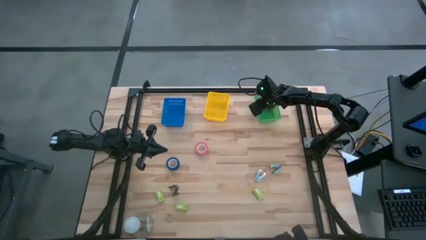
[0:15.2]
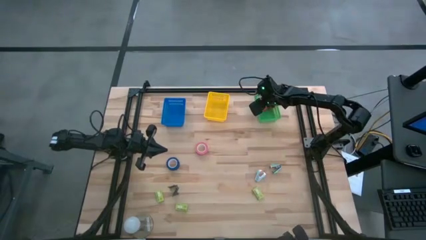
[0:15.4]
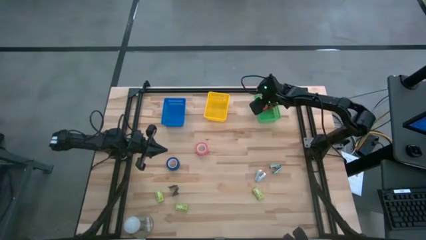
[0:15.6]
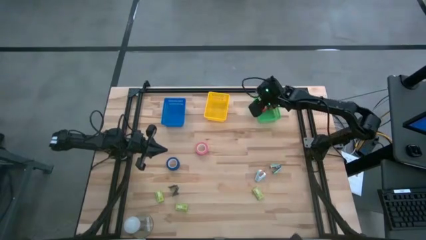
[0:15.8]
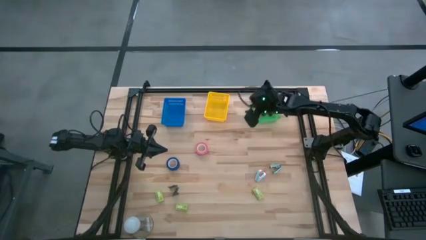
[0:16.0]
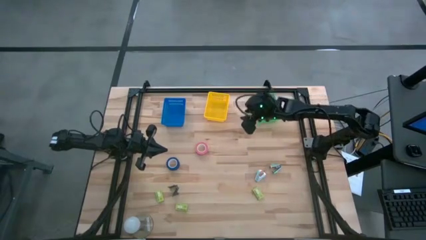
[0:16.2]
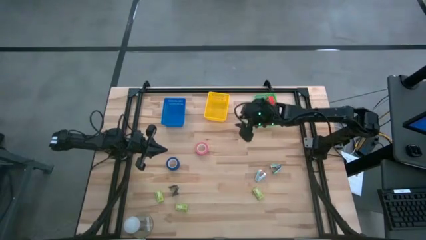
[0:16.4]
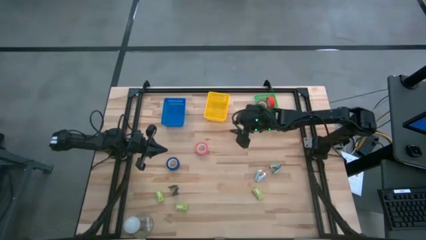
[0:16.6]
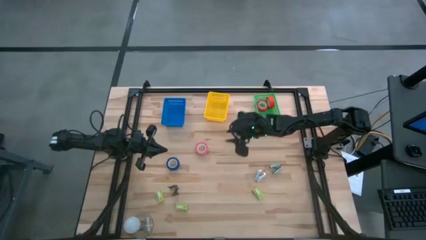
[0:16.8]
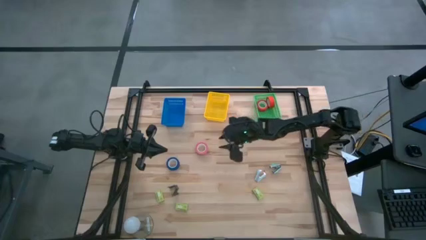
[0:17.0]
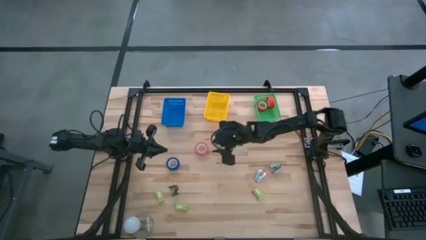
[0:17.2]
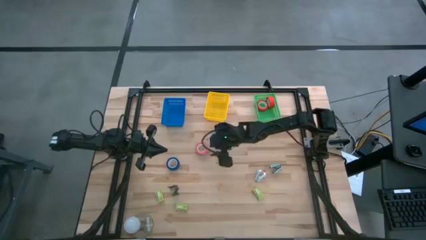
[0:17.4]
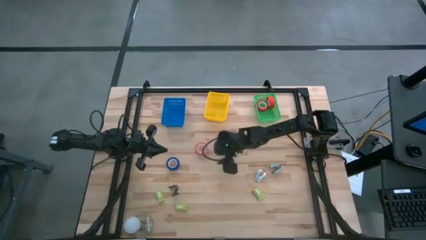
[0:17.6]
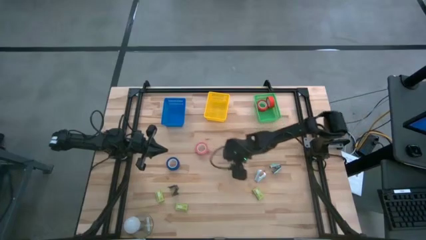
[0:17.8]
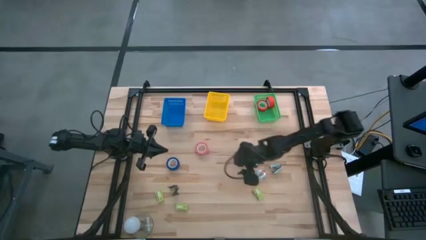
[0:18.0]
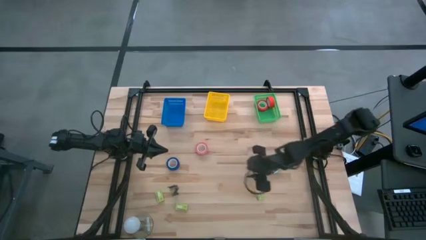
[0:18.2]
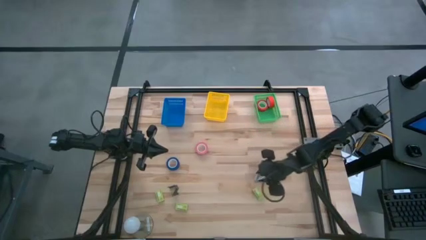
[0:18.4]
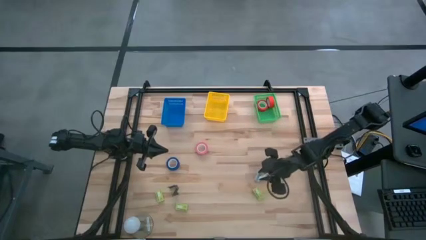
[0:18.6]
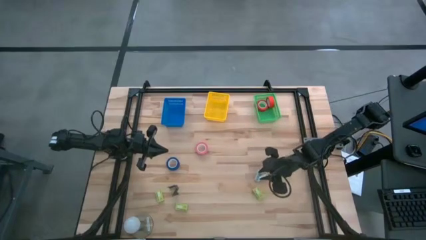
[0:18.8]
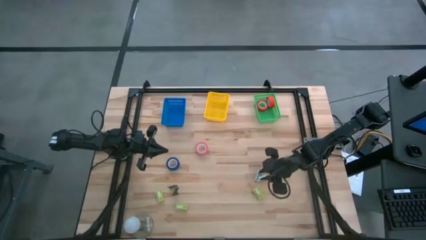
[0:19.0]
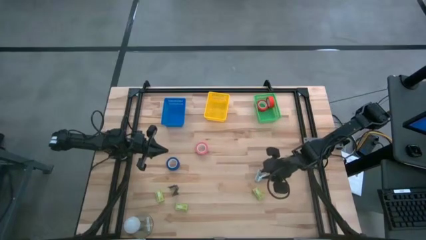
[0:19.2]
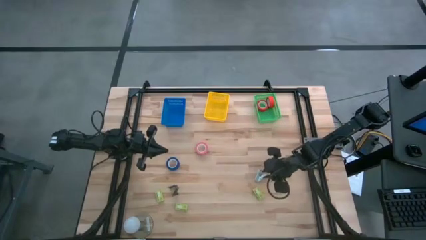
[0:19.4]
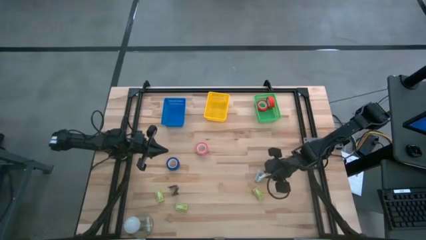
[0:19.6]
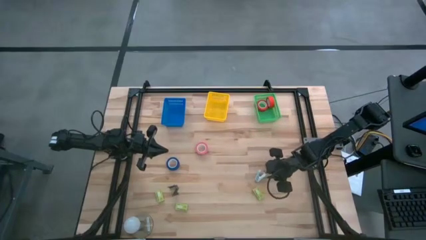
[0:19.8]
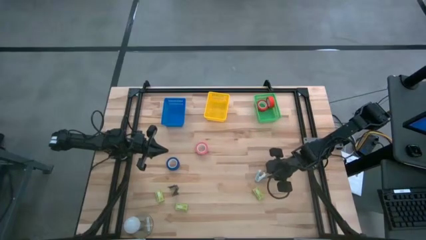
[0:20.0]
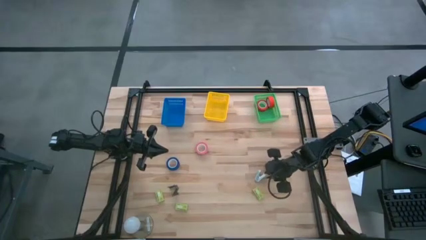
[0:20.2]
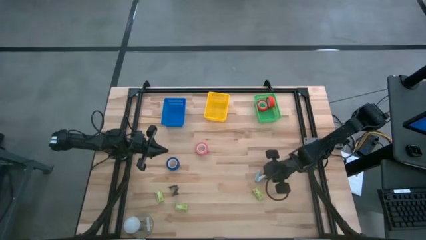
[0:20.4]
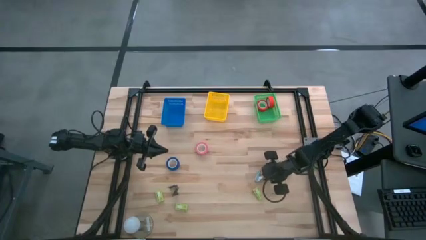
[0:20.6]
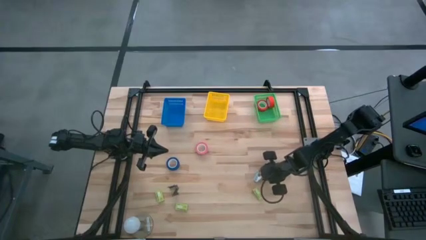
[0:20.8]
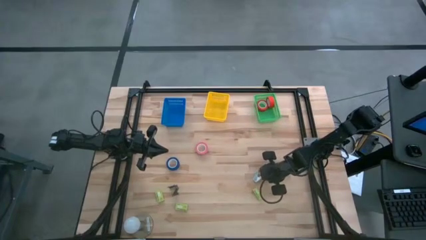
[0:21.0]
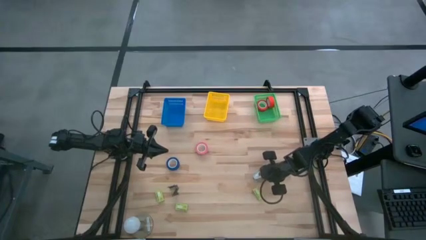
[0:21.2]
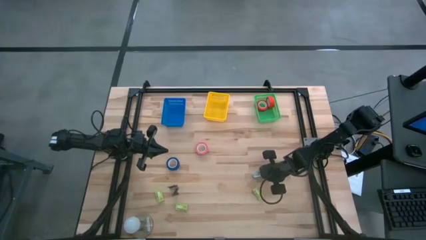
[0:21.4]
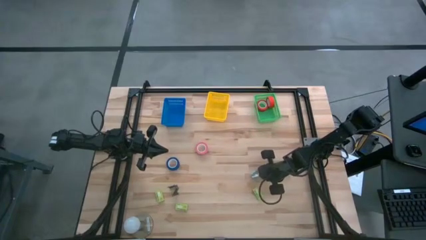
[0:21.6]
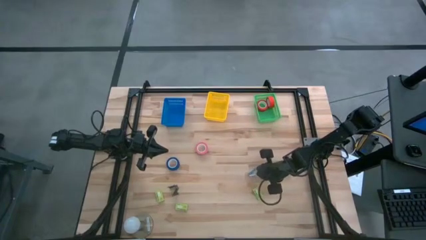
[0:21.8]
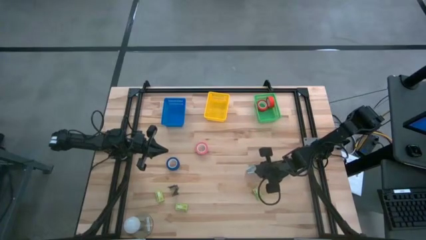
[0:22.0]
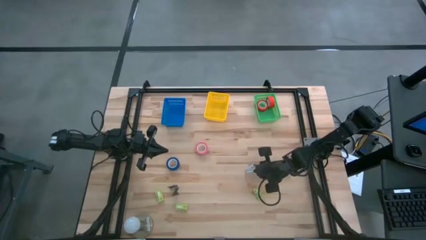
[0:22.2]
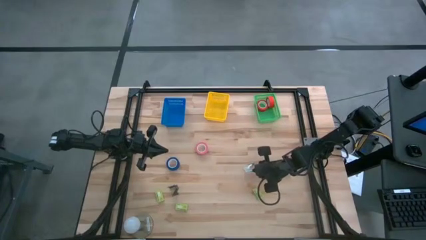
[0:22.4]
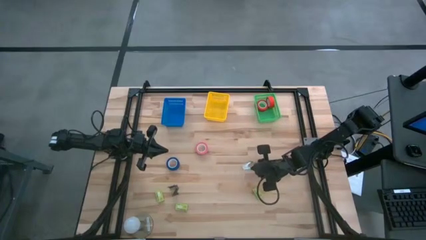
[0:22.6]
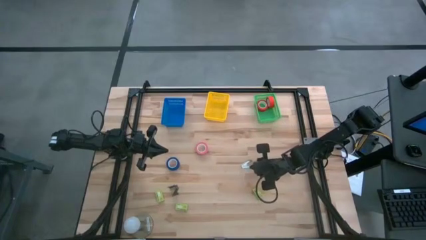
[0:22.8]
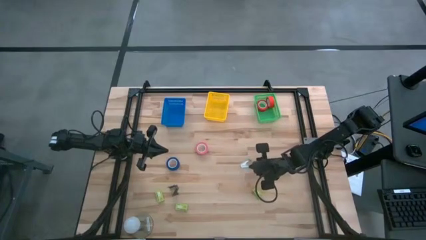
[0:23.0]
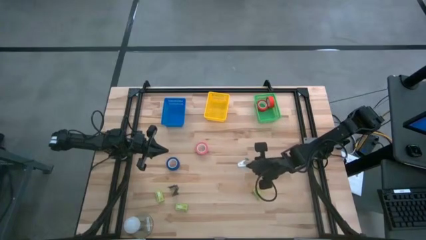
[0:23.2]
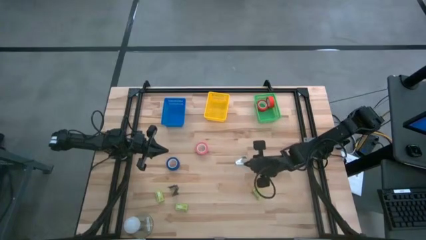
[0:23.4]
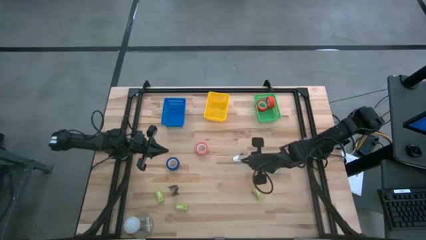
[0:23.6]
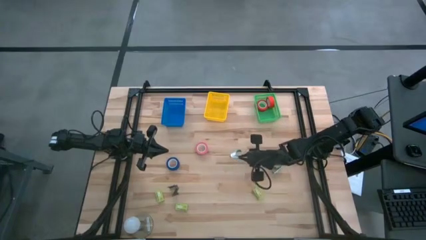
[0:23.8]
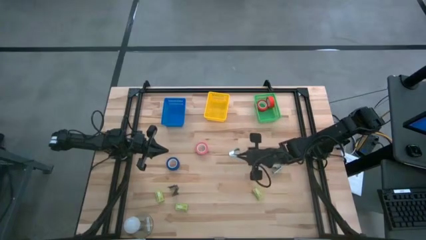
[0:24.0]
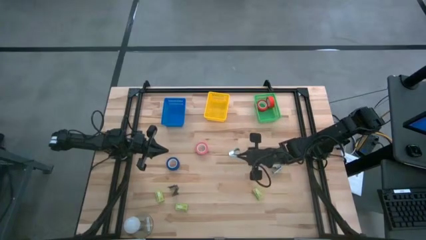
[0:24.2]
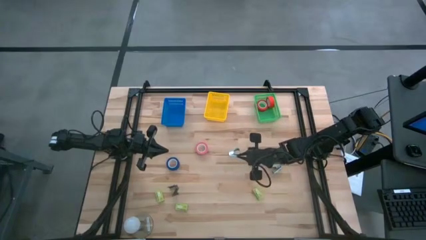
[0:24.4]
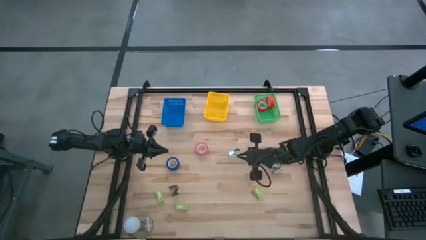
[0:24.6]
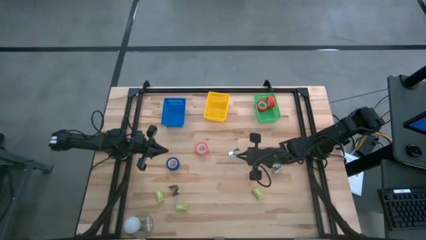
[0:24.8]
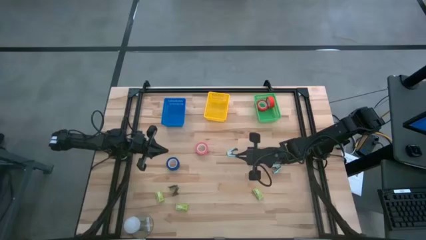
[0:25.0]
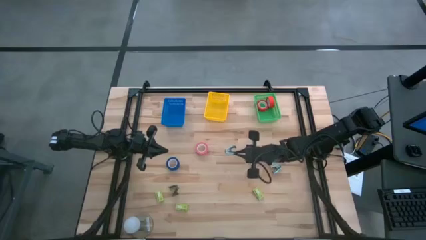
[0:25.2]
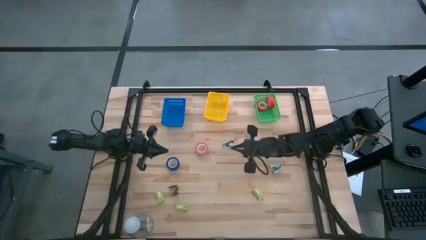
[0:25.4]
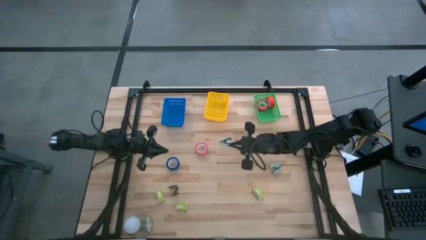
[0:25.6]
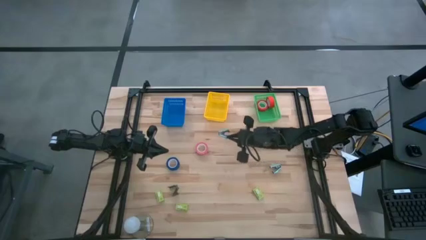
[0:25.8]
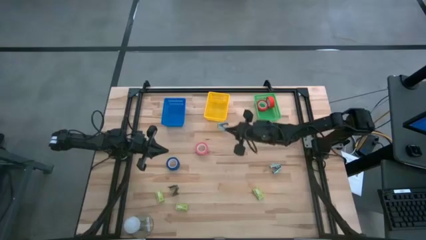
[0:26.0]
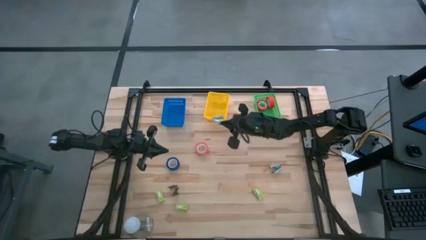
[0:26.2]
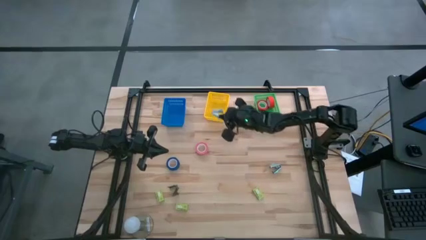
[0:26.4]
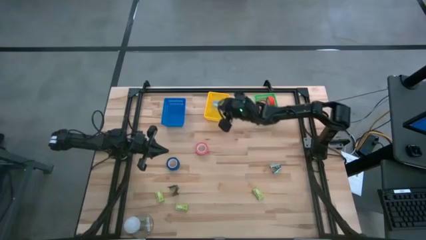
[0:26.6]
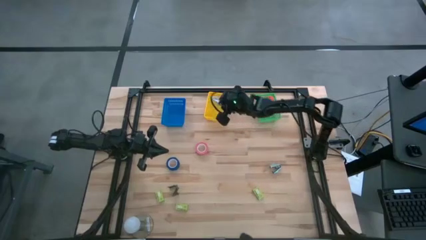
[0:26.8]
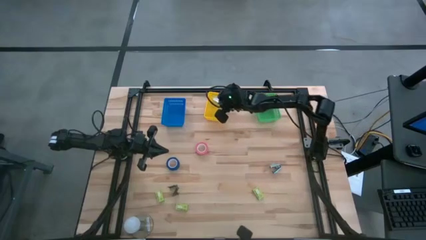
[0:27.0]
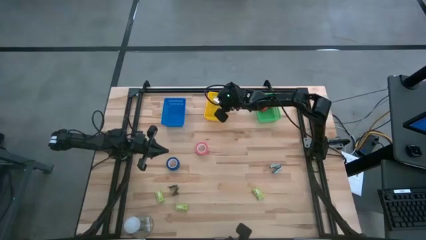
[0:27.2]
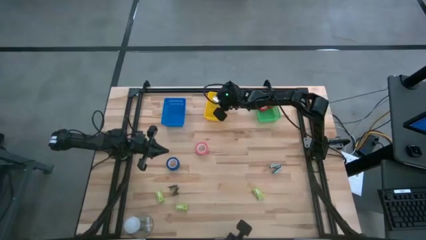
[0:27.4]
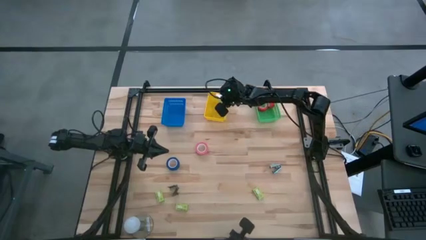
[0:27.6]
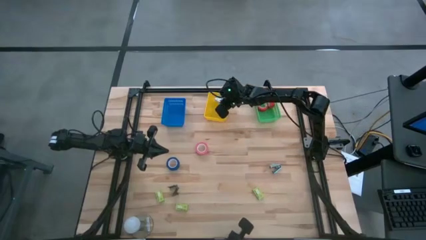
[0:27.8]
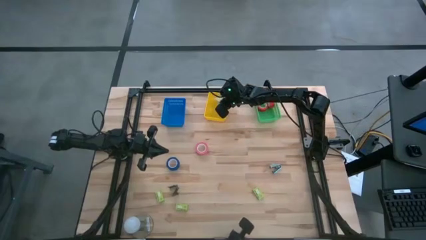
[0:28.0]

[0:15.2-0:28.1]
Task: Pick and place Stapler, Stapler remover, tape
Put the light blue staple remover into the yellow bin

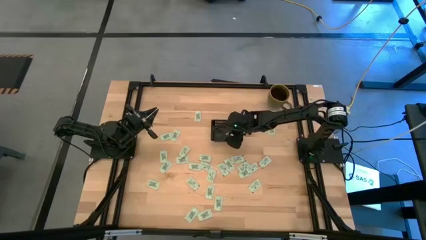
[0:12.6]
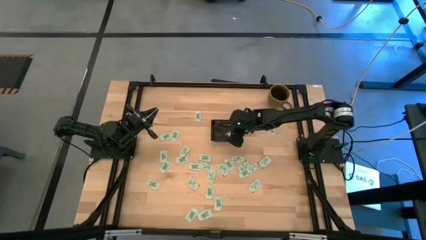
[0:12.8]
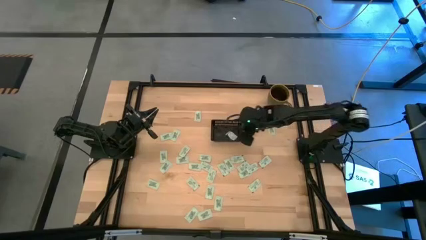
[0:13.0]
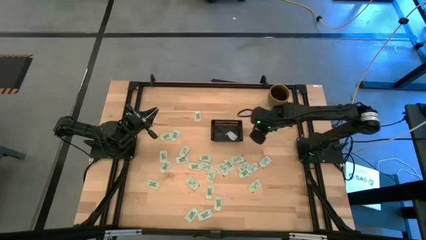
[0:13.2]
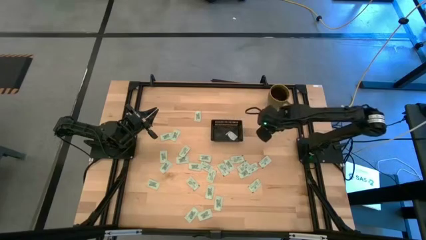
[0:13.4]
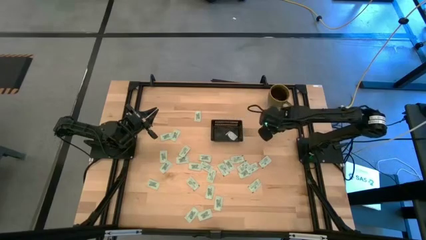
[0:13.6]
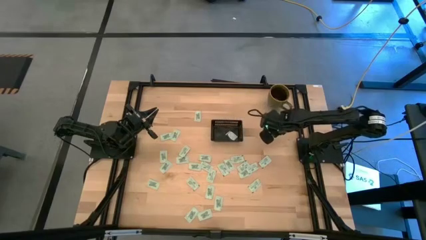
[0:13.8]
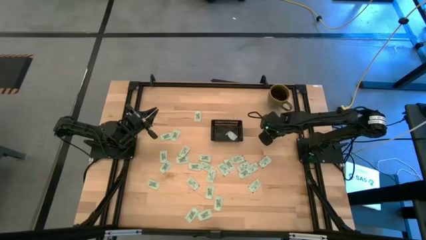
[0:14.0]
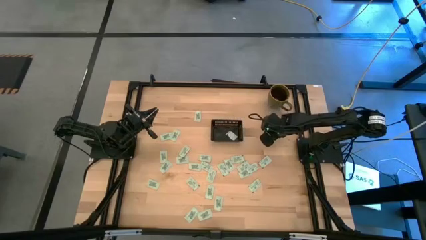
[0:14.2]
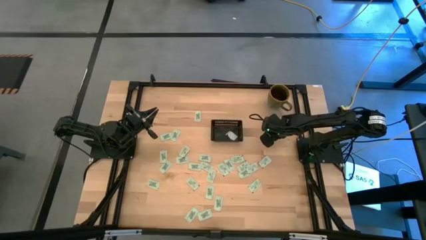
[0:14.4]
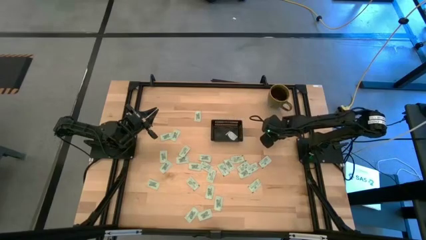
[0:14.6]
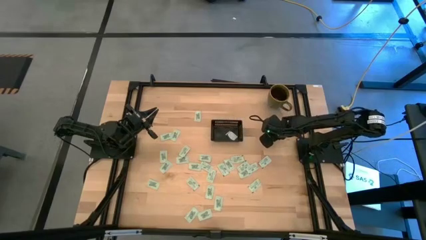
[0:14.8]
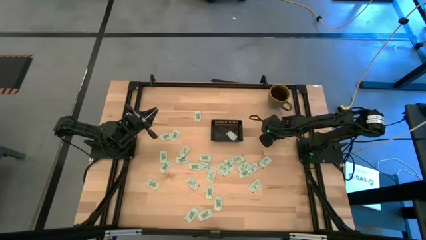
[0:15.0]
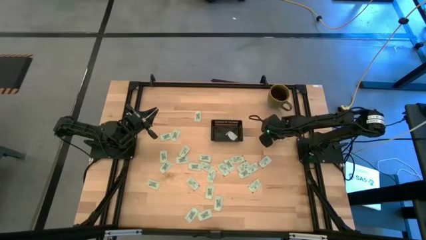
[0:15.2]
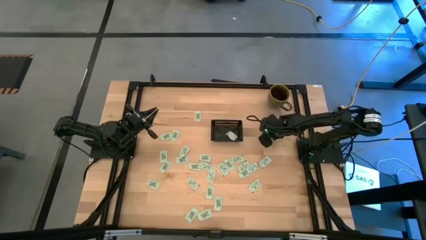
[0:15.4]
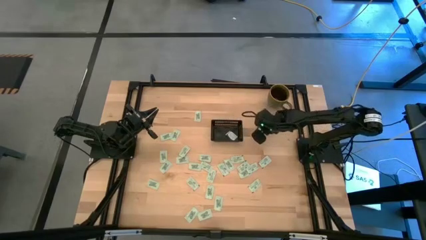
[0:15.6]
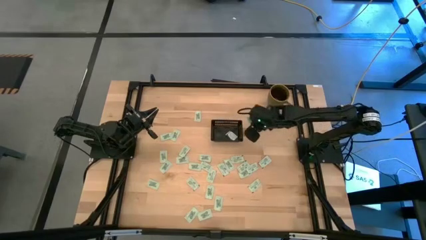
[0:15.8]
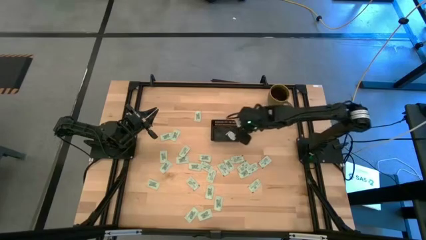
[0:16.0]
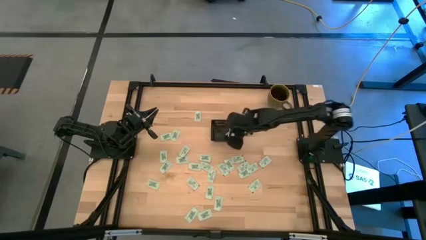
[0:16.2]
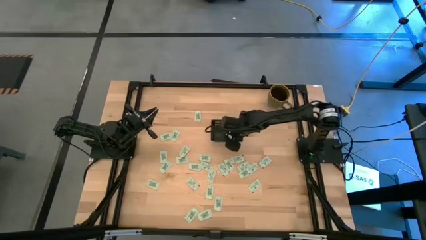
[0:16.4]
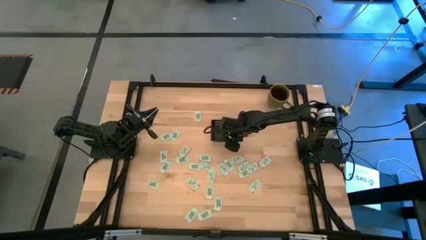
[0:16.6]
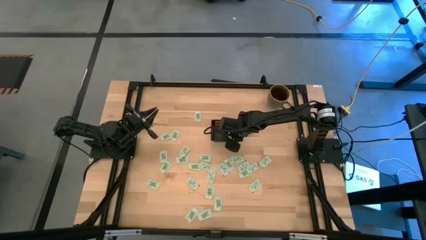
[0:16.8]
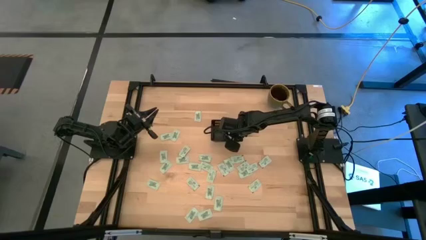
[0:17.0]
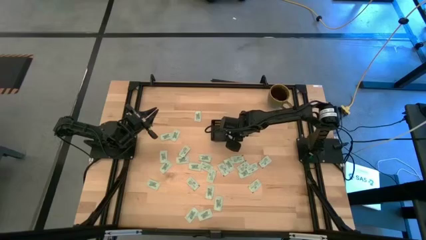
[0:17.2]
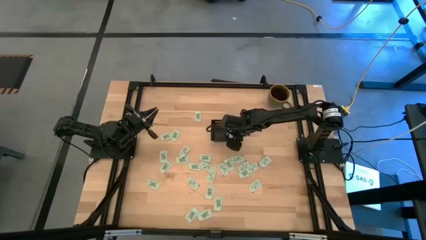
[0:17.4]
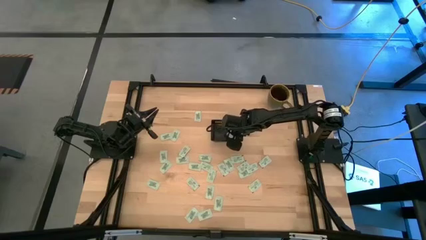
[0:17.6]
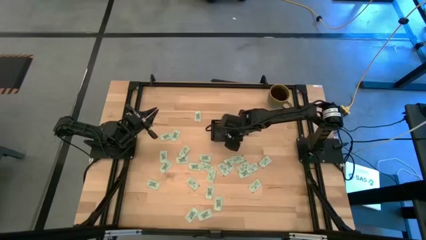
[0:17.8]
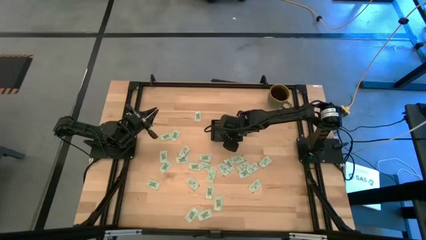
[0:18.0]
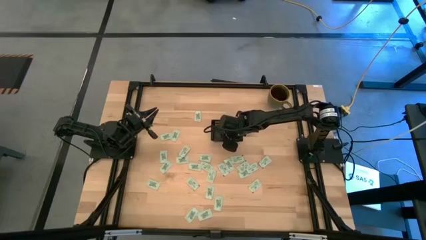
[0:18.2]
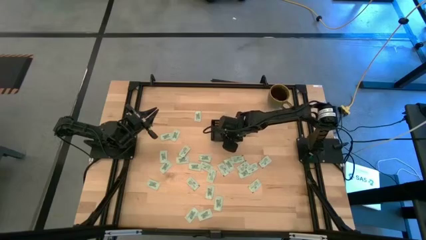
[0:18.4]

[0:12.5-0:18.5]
Task: Pick and place Stevia / Truvia into bins
Put the stevia packet into the black basket
